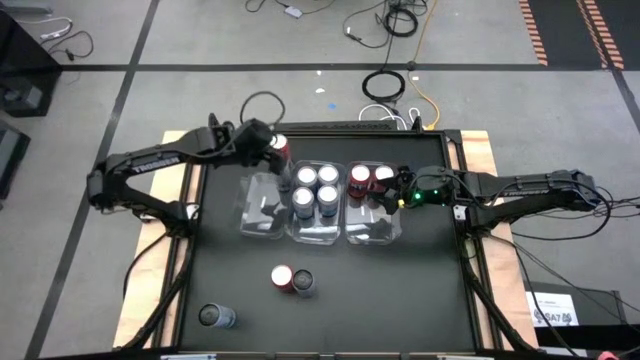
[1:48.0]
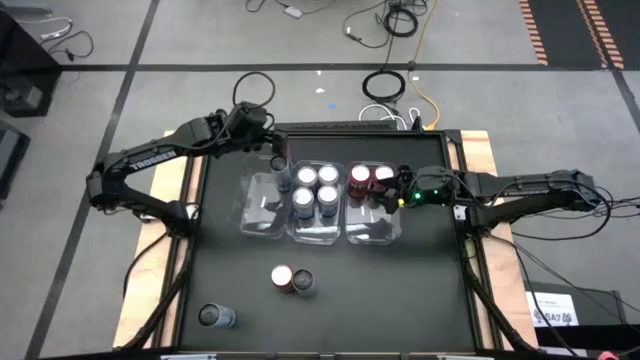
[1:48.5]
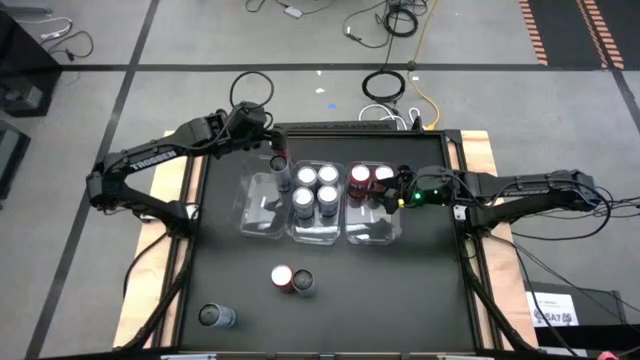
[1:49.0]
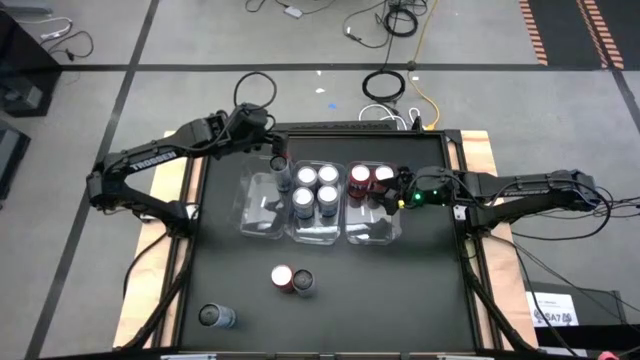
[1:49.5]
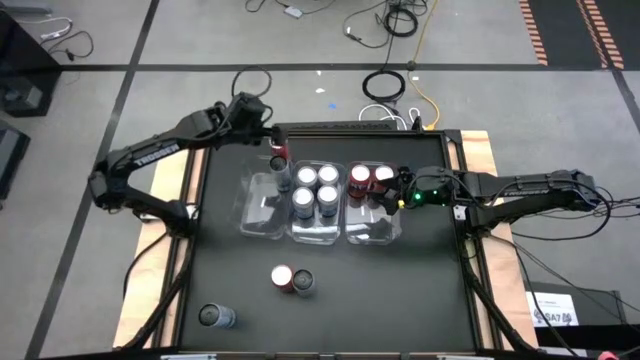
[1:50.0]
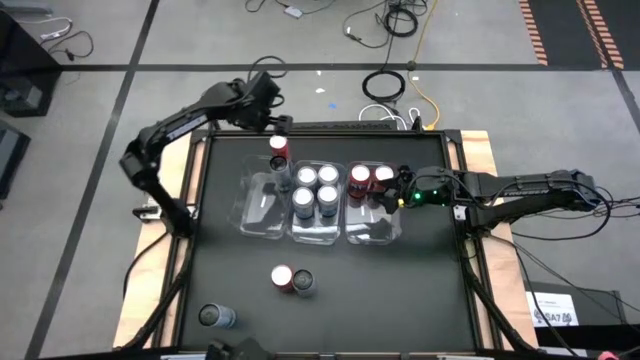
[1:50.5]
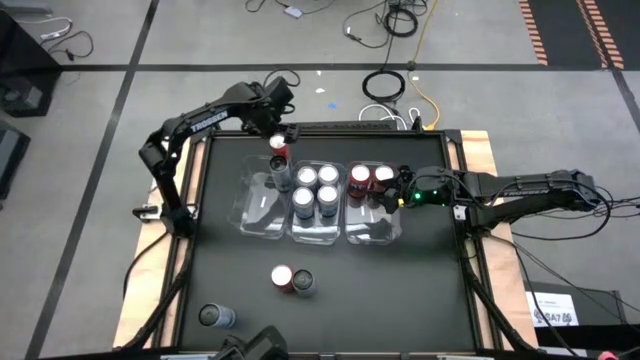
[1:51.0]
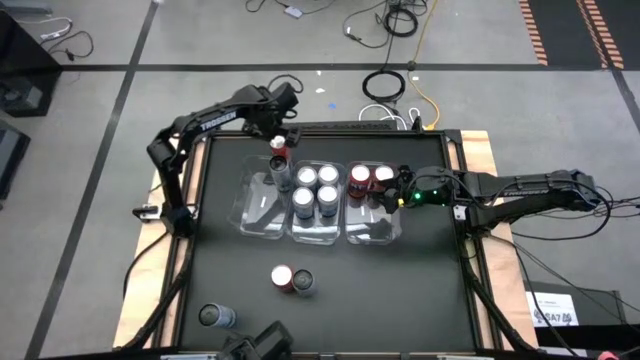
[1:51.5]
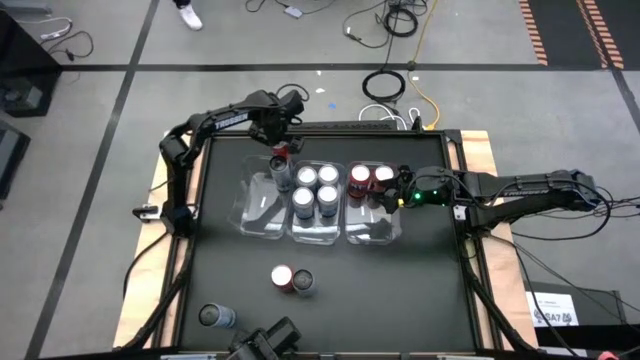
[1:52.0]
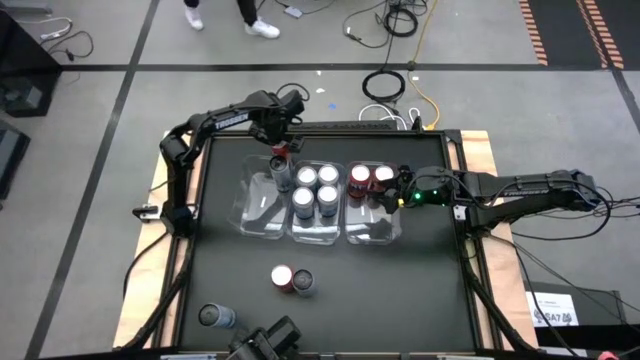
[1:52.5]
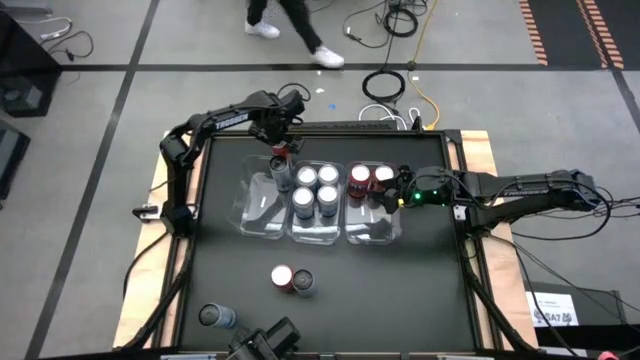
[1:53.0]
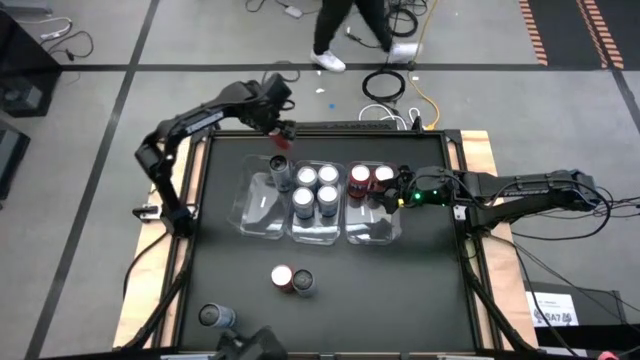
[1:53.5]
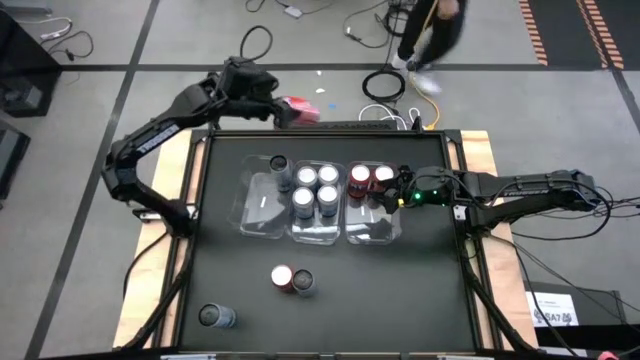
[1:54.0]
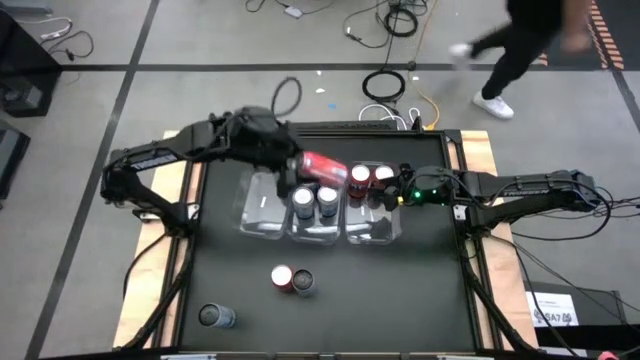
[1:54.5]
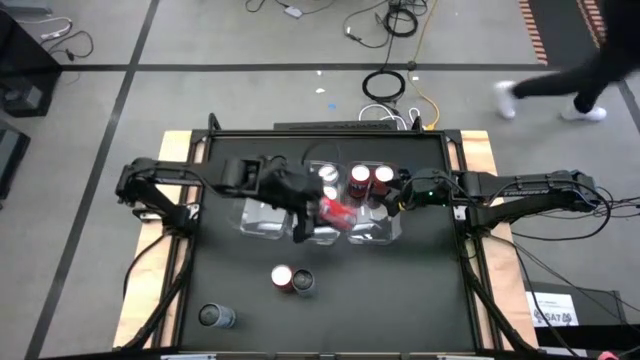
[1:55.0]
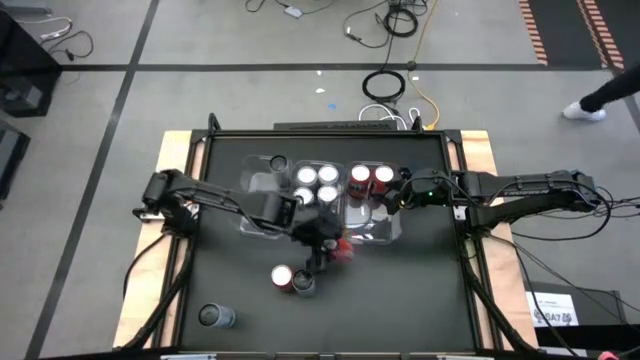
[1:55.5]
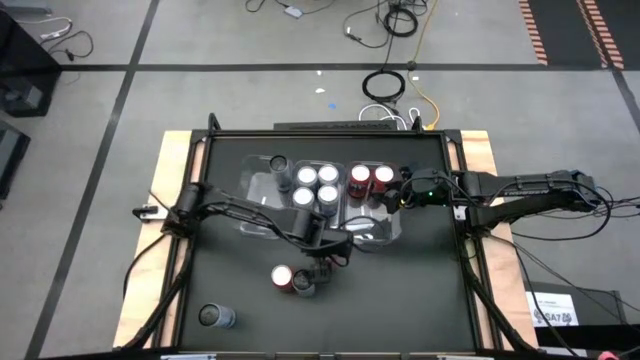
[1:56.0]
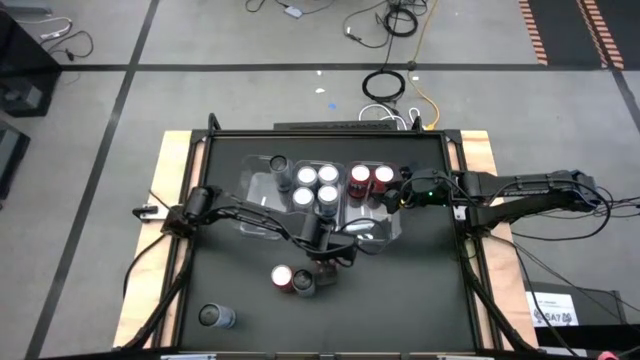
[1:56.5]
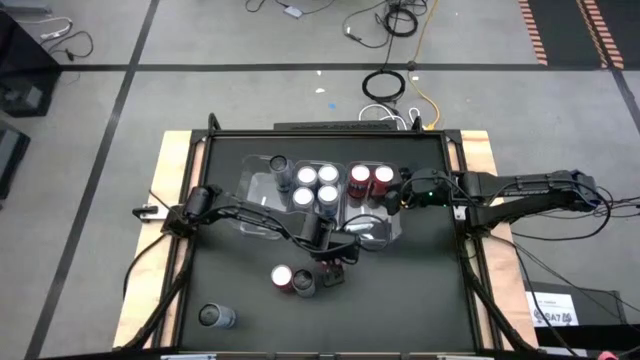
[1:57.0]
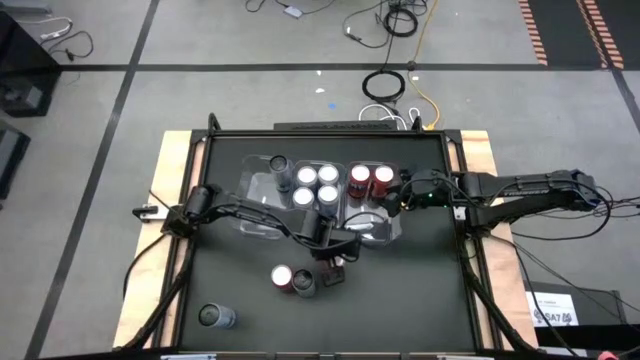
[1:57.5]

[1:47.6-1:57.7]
Task: Sort soda cans
Move the top red soda can to the center of the table

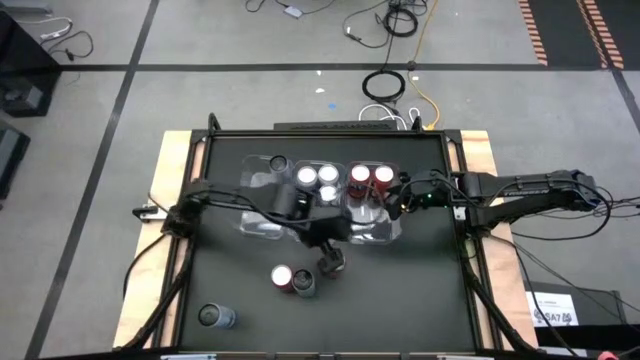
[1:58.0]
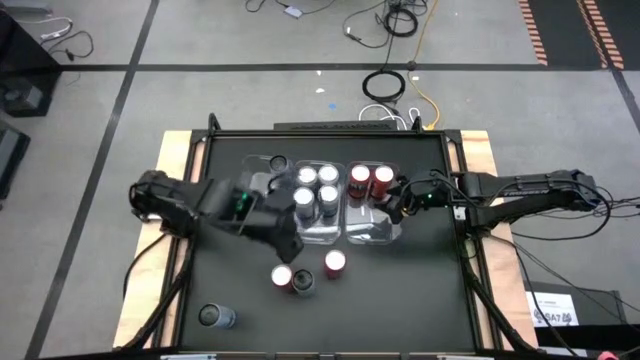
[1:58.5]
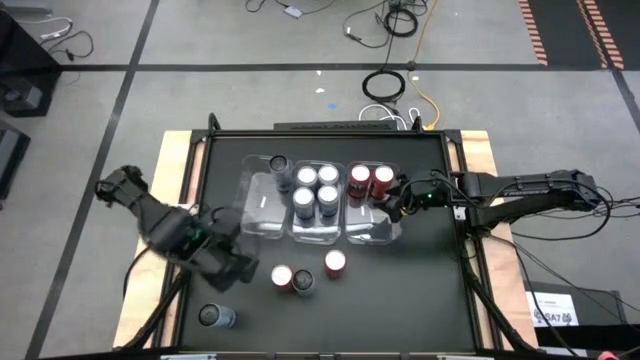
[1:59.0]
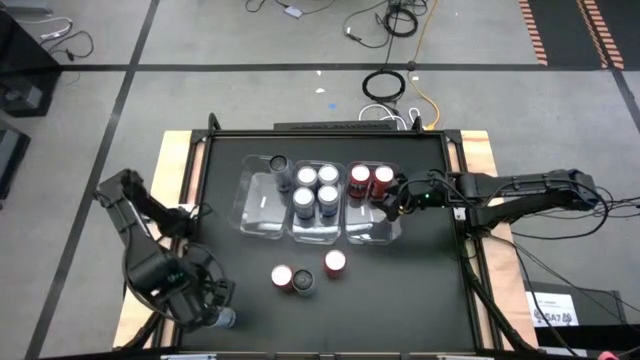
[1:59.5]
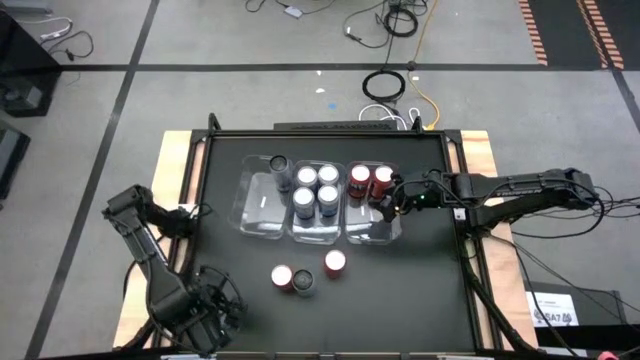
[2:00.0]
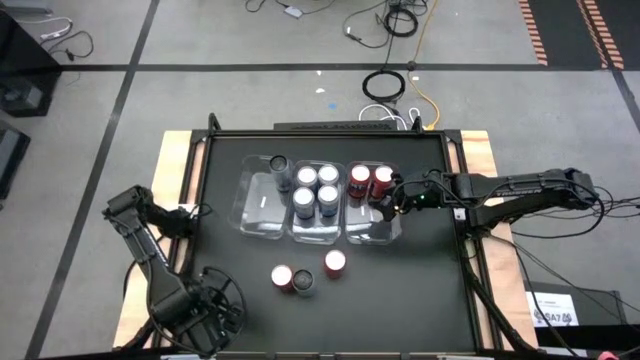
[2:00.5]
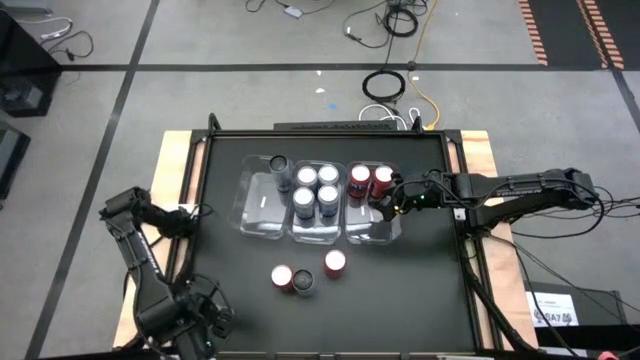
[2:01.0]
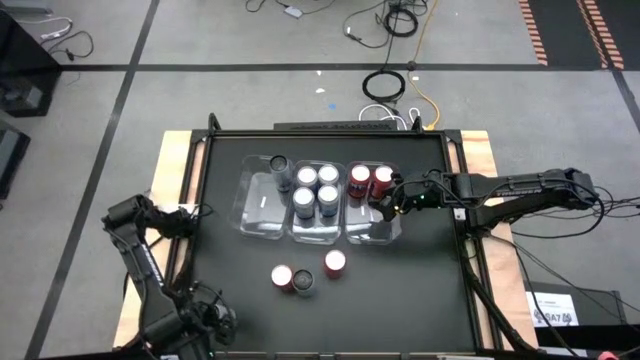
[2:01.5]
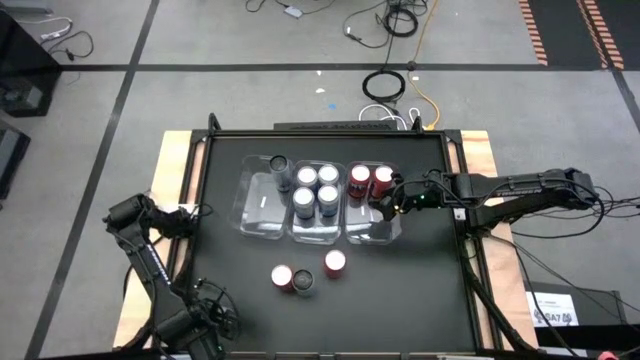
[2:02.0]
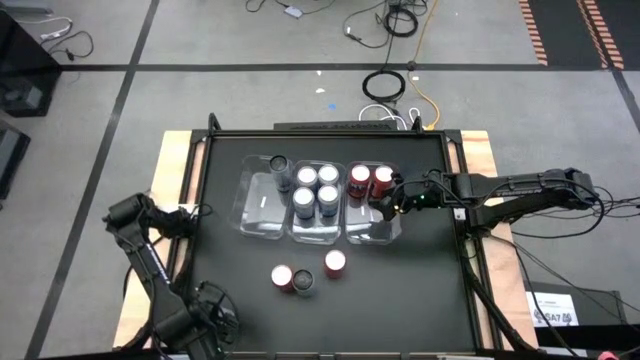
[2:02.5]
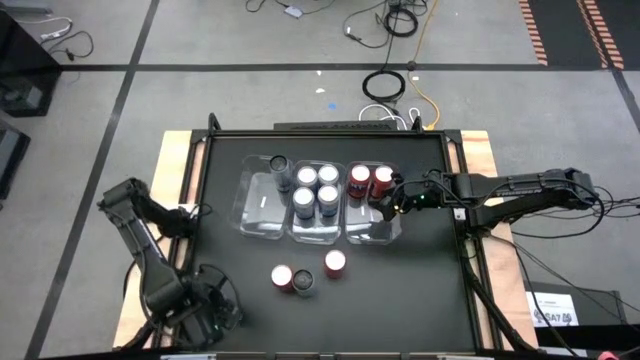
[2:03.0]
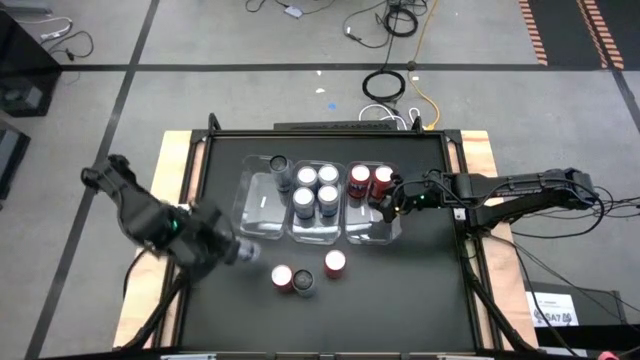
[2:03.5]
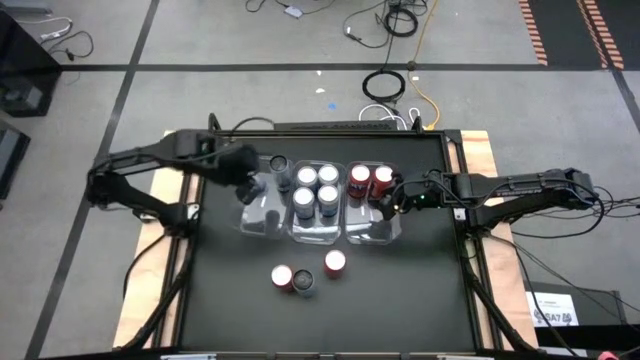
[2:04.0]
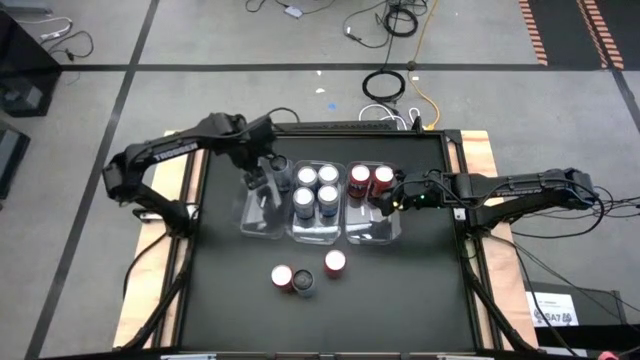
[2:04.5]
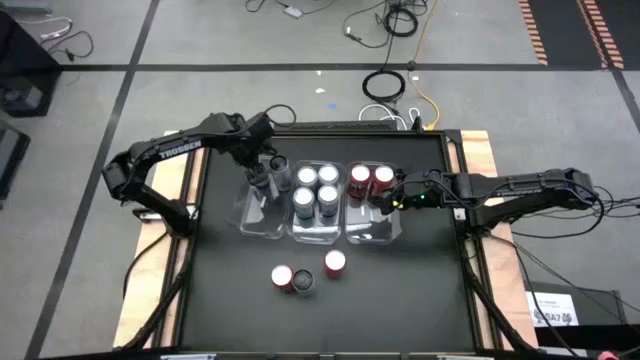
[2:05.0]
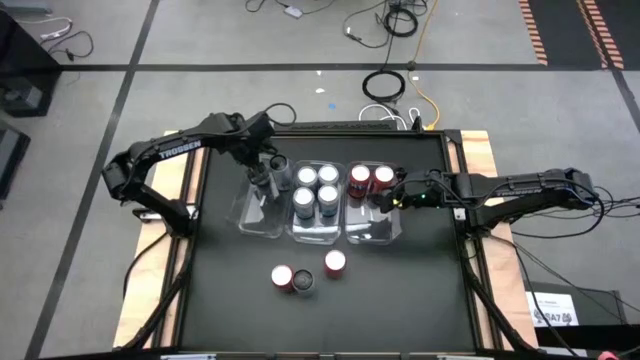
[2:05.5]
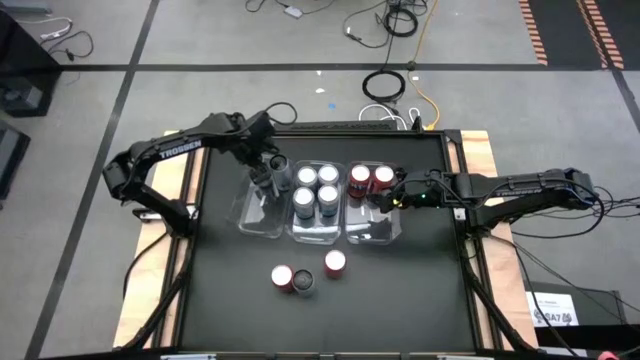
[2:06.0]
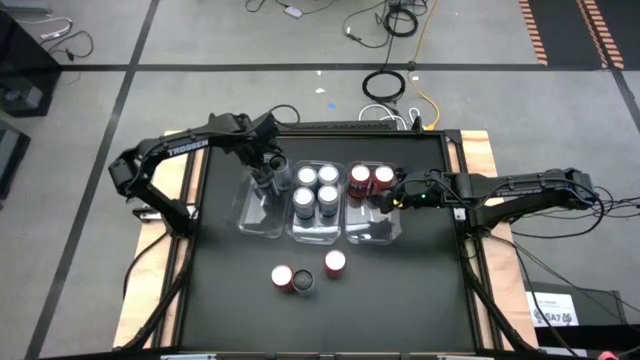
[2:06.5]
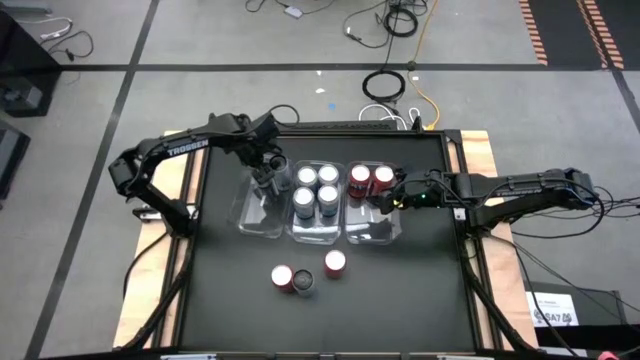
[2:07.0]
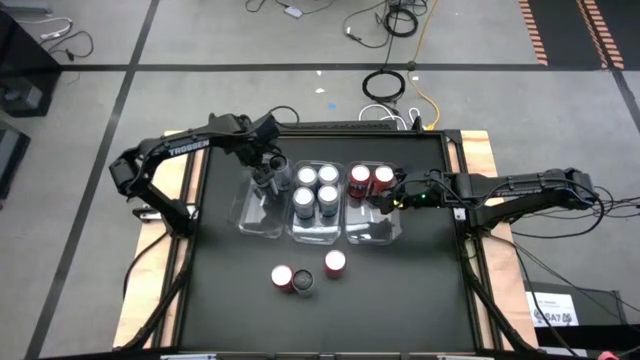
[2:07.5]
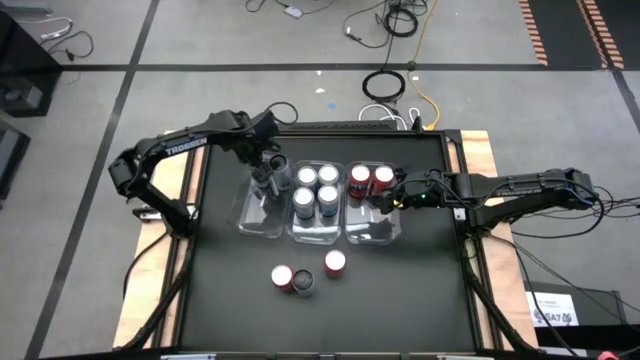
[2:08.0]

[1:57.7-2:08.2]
Put the bottom left white-blue soda can into the left transparent bin
